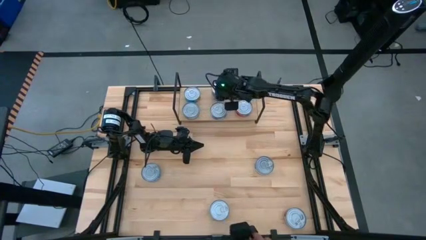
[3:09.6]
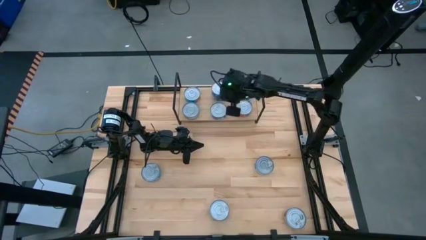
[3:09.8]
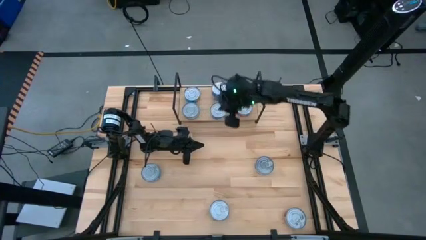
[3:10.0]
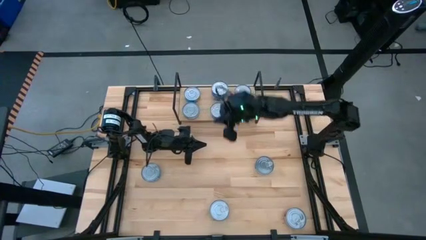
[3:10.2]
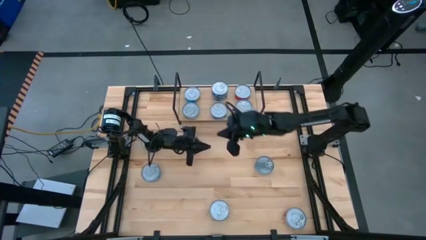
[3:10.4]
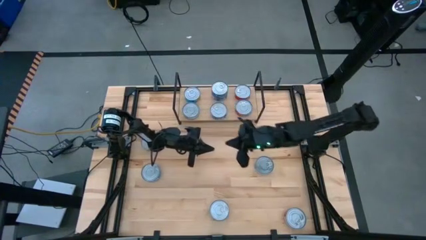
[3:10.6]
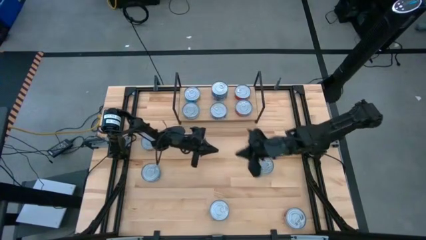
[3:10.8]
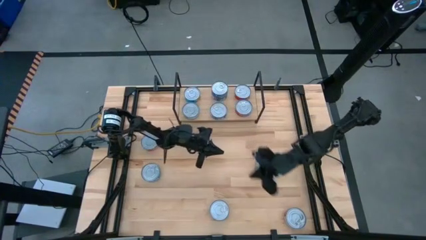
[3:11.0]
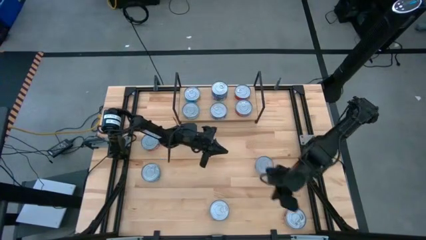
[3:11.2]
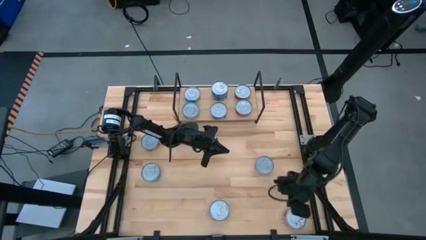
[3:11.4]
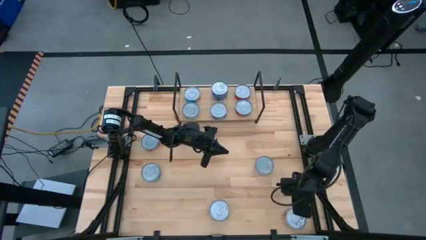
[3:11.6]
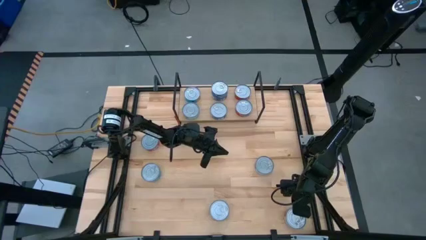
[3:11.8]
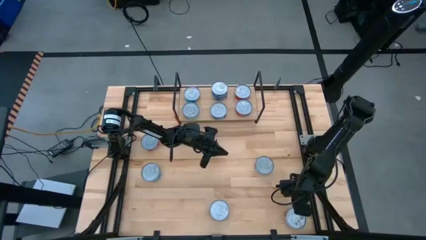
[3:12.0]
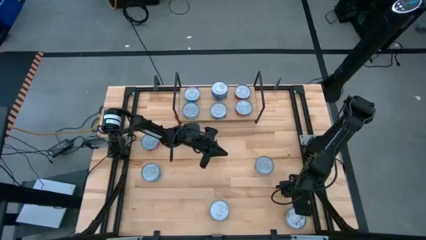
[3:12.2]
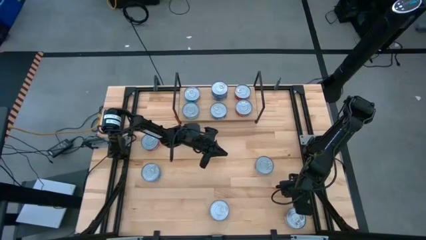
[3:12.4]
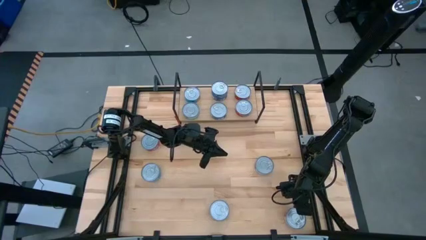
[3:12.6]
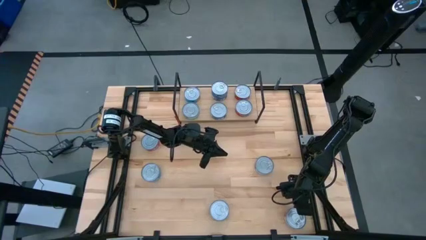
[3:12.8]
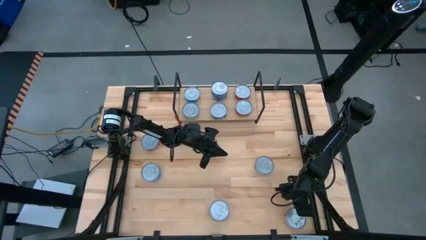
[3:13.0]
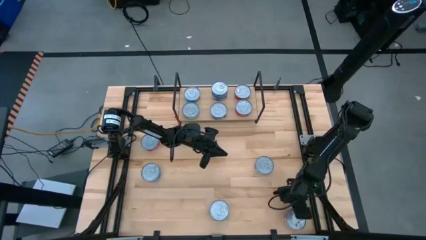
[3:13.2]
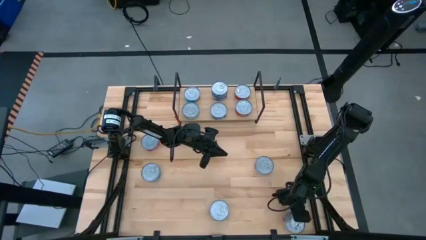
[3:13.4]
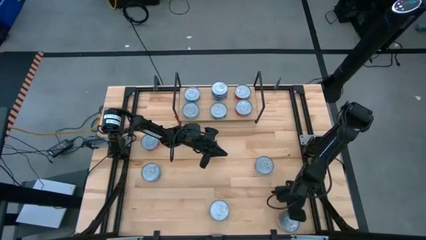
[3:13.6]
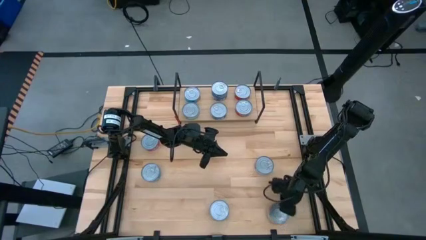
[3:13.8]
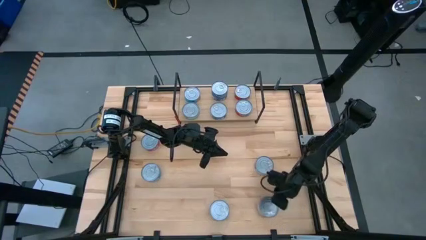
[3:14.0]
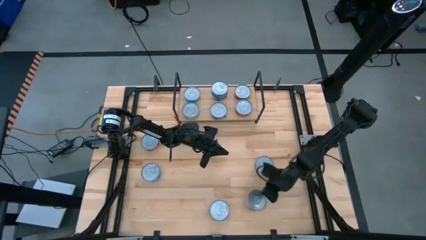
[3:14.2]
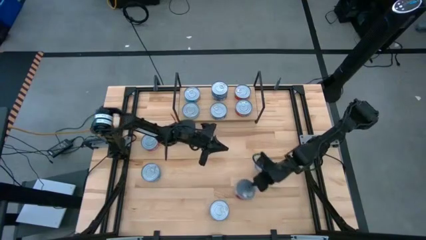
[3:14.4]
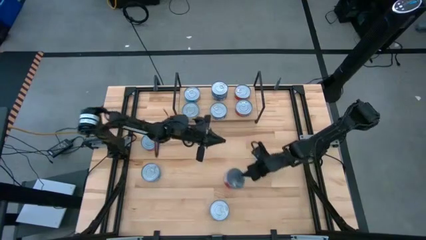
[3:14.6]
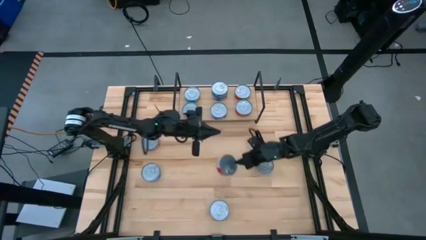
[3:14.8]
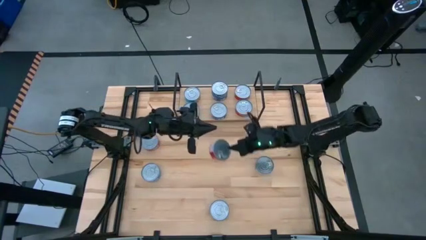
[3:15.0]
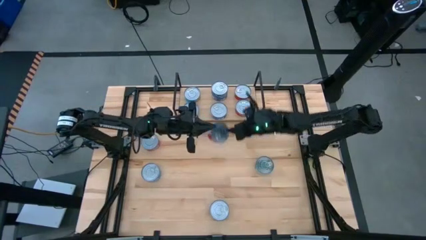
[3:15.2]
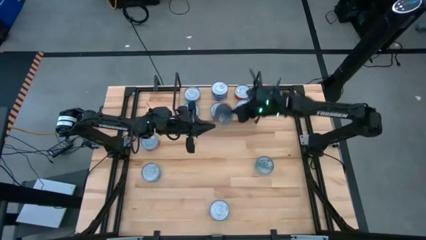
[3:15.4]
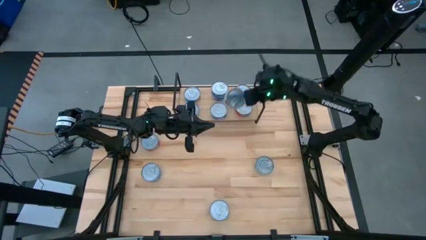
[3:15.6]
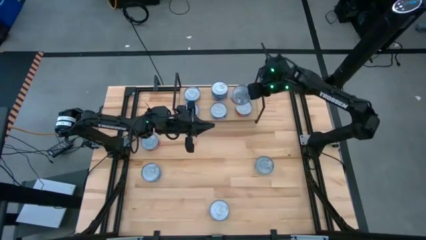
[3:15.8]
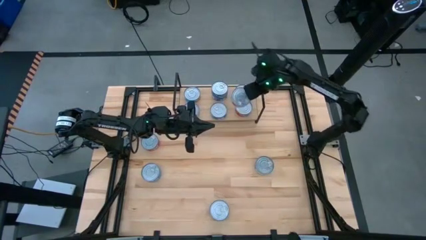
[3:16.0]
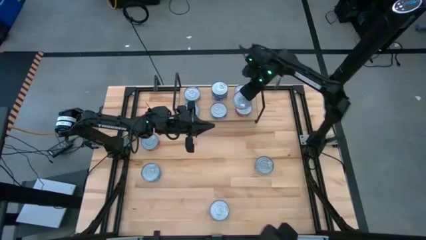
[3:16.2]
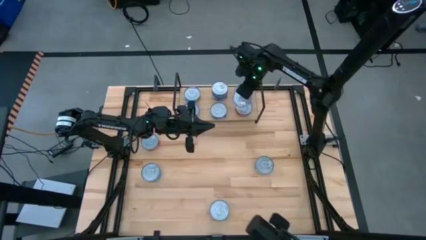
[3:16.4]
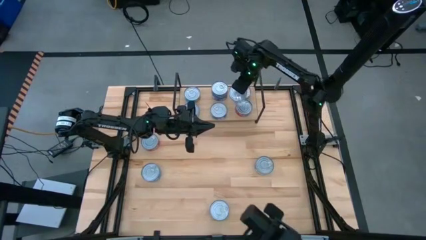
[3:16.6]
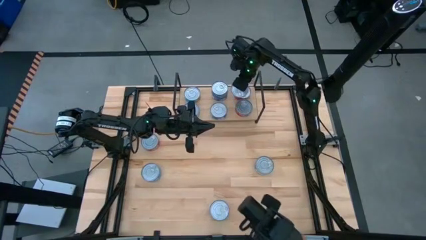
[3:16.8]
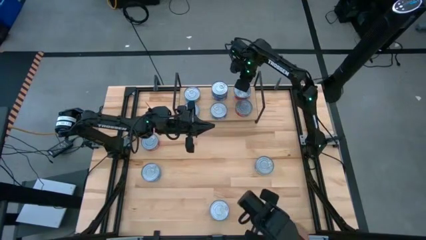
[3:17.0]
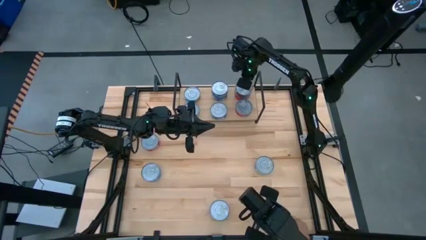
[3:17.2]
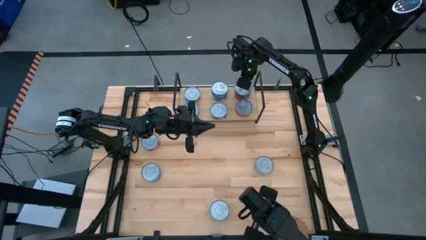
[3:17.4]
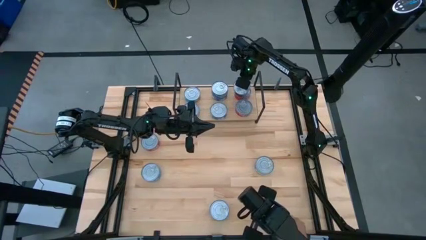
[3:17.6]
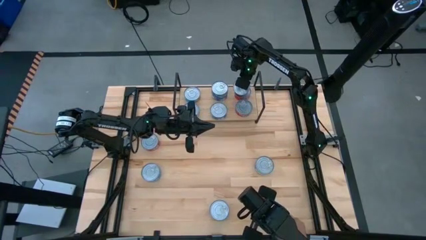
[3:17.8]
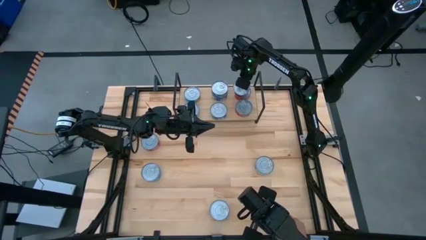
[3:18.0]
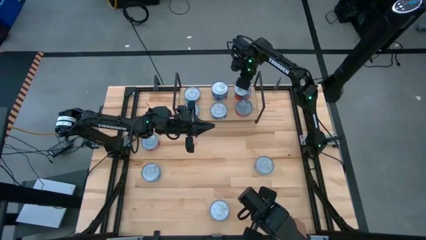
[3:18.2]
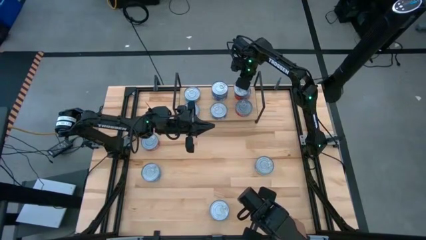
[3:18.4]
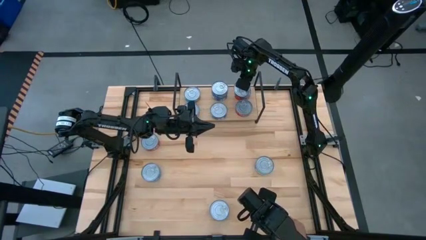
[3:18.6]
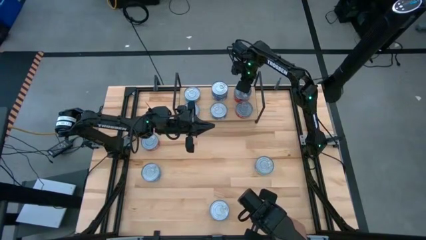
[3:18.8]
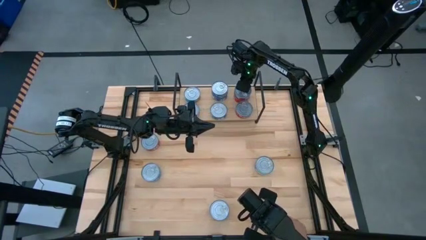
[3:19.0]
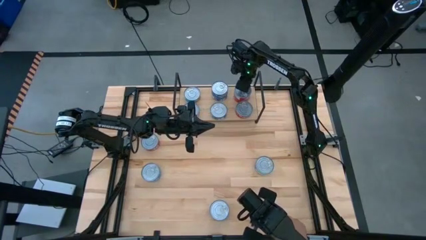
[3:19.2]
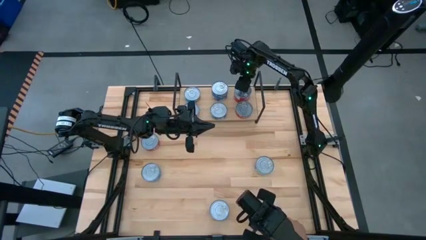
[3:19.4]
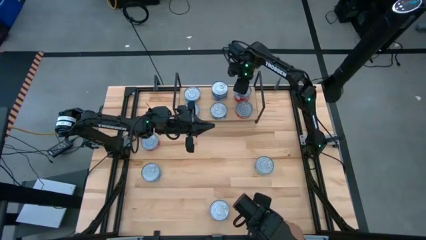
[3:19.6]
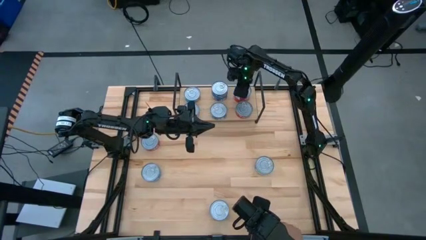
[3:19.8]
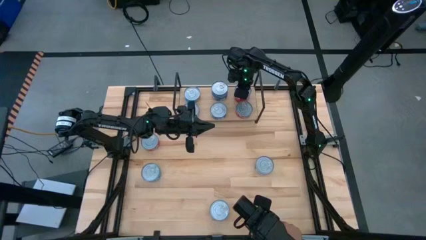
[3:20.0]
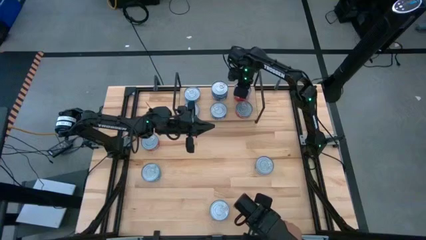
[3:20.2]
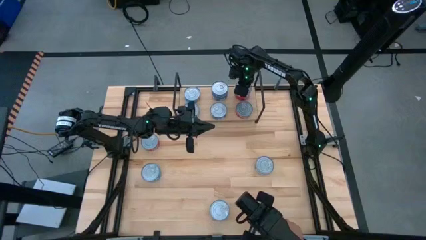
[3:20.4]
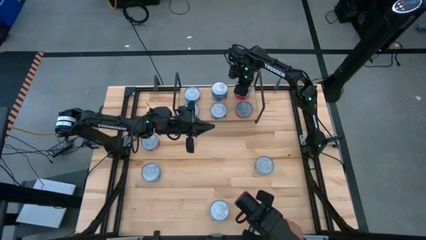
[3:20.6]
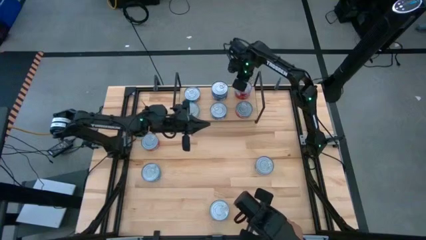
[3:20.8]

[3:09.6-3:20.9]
Task: Stack canned seafood by type on shelf
Stack the bottom right red tuna can on top of the other red tuna can on the shelf

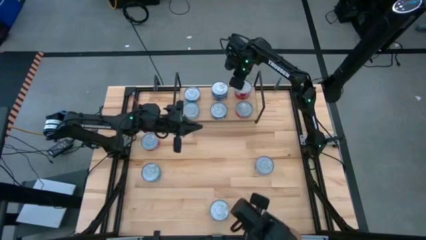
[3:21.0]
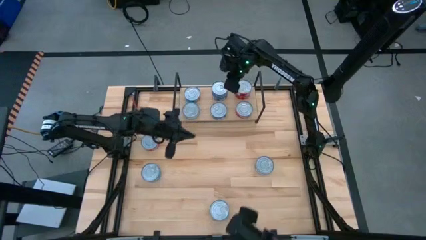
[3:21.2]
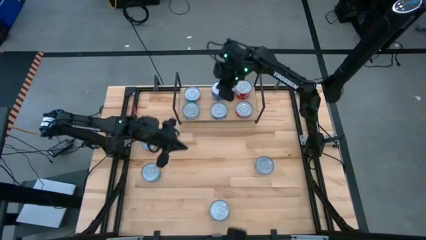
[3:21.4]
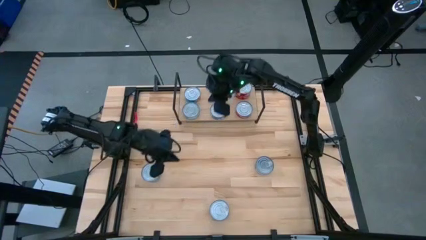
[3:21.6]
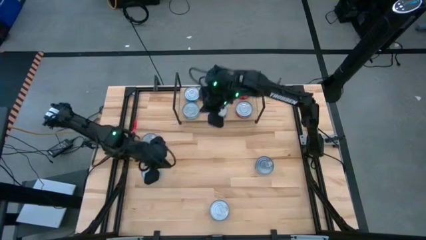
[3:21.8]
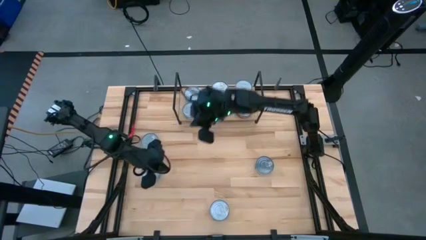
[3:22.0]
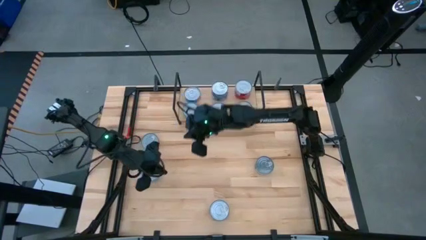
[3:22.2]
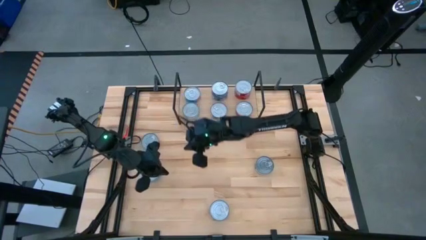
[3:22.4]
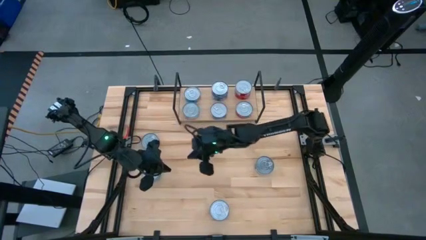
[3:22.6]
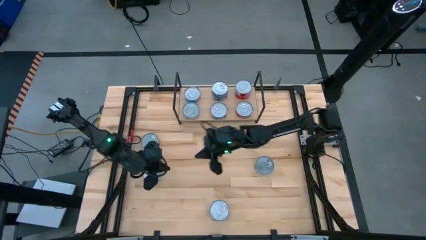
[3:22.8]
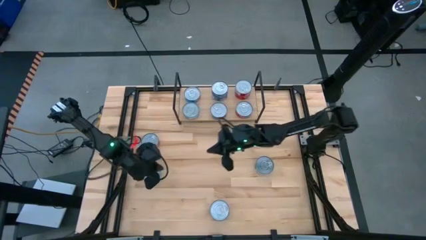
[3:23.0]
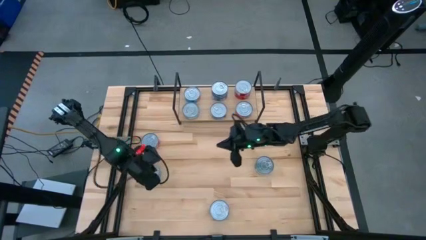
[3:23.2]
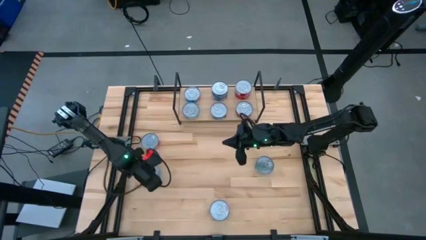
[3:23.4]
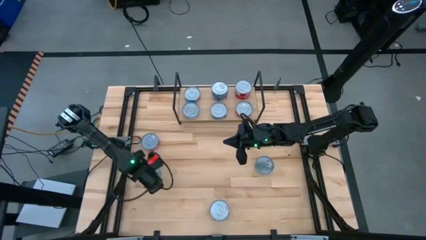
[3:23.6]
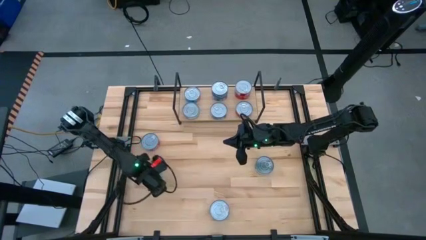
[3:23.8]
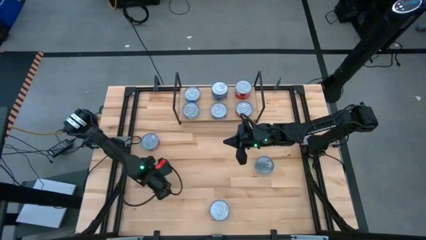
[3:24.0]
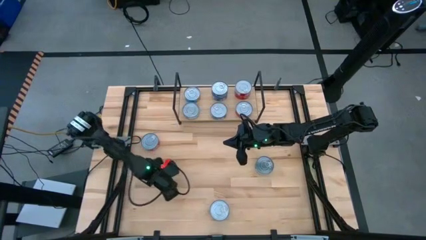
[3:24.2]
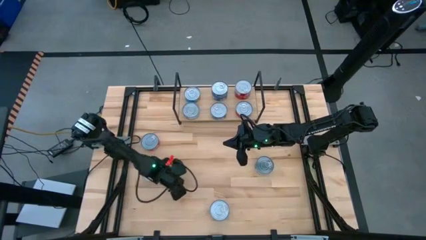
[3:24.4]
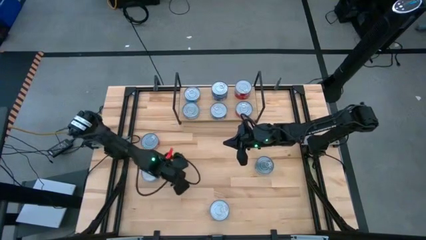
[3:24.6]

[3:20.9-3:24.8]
Move the middle left light blue tuna can to the center of the table

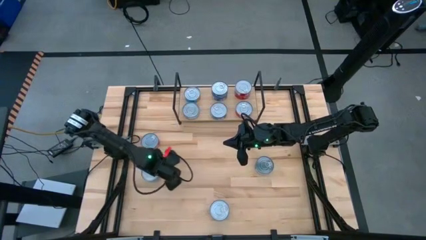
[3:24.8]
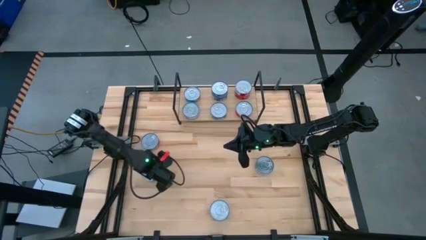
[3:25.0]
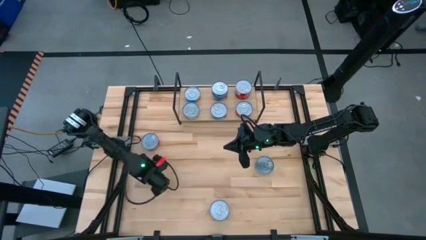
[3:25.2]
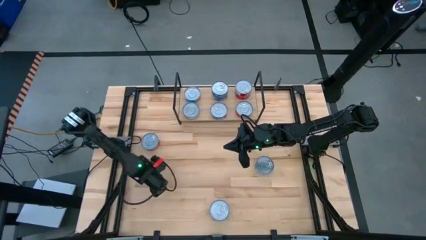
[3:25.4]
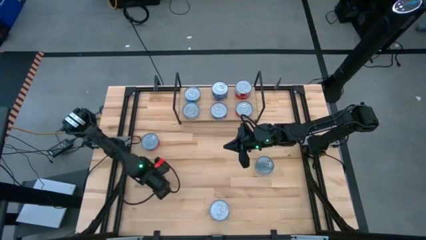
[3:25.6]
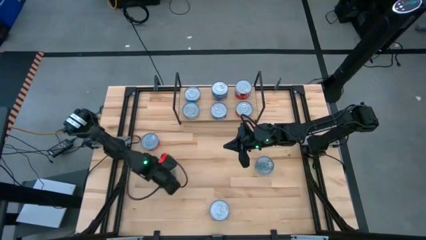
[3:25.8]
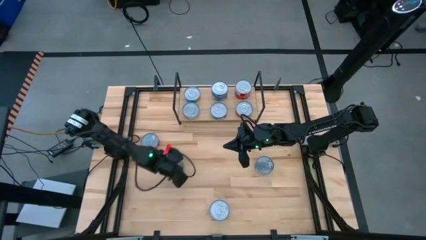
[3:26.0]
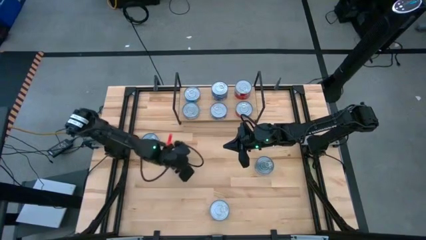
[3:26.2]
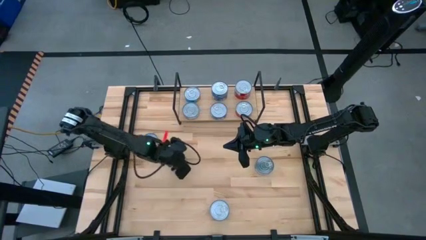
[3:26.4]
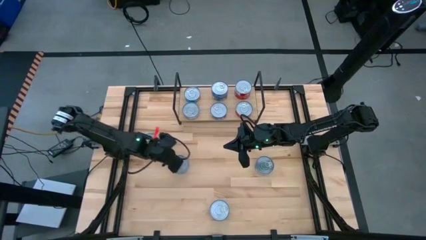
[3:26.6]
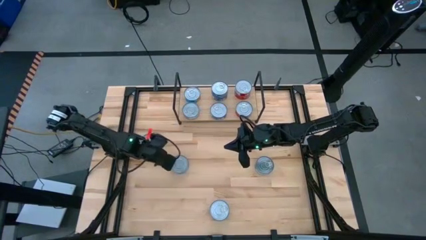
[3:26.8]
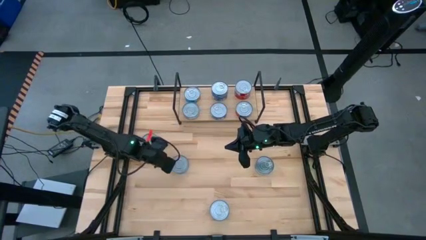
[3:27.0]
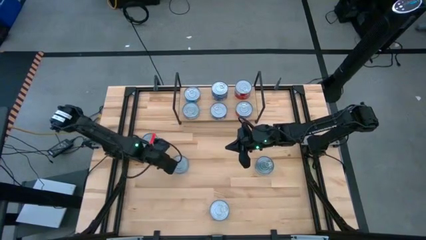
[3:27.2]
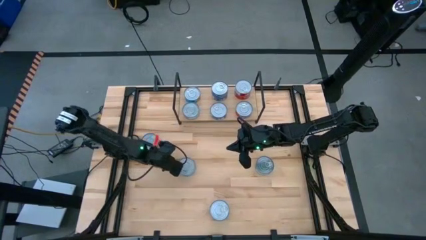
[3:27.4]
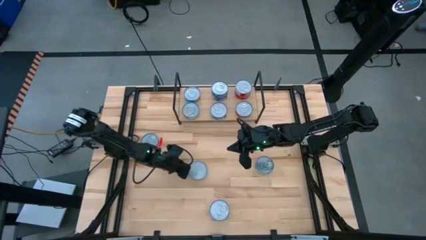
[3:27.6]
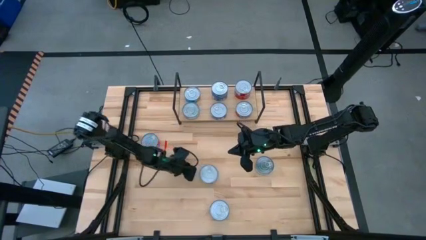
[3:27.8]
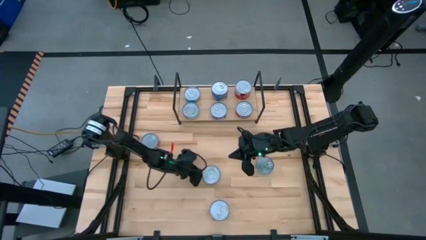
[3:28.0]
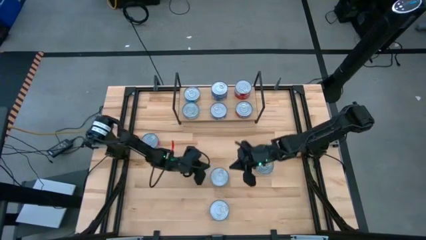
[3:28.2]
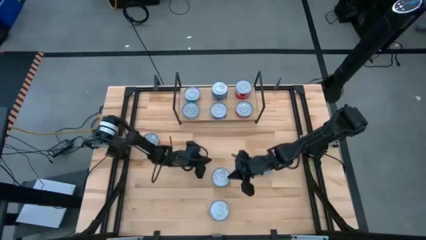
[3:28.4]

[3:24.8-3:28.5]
Move the middle left light blue tuna can to the center of the table
